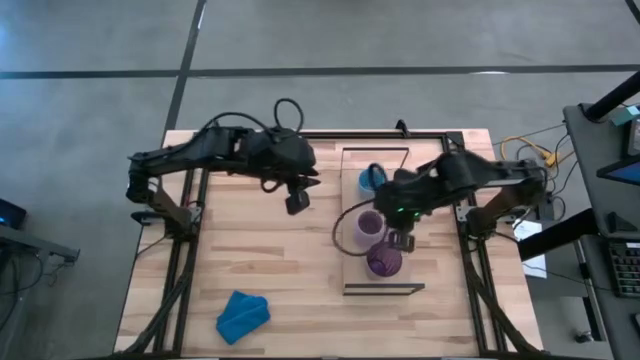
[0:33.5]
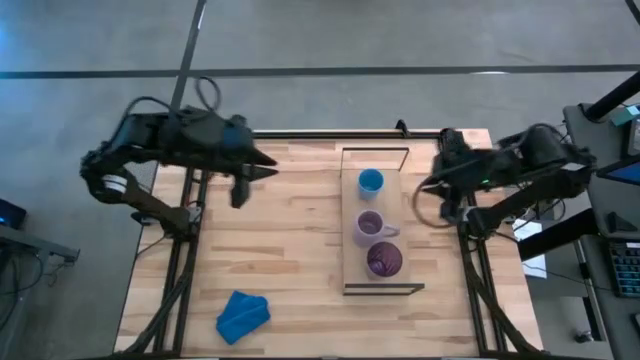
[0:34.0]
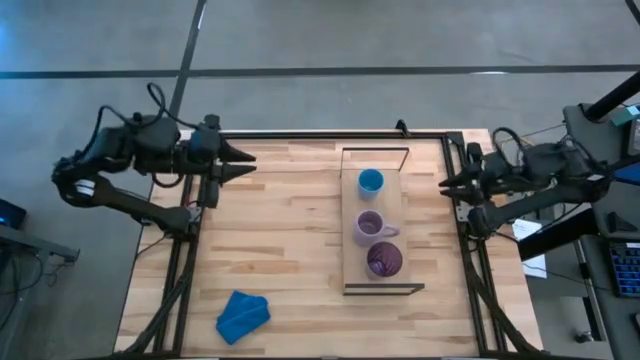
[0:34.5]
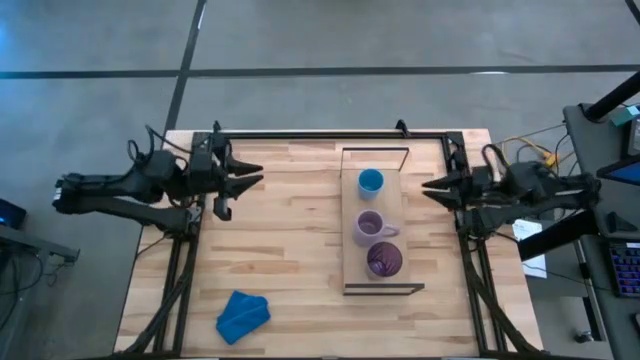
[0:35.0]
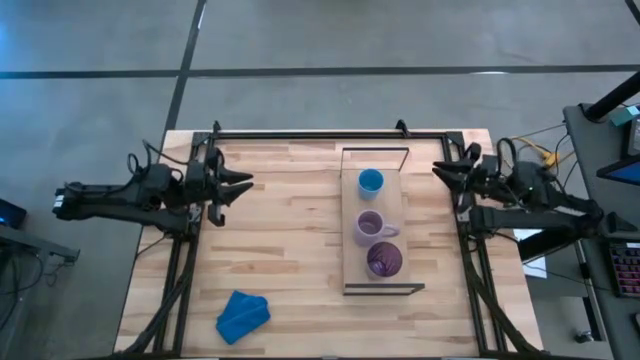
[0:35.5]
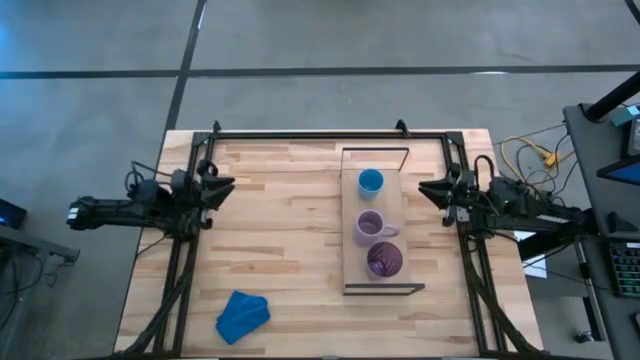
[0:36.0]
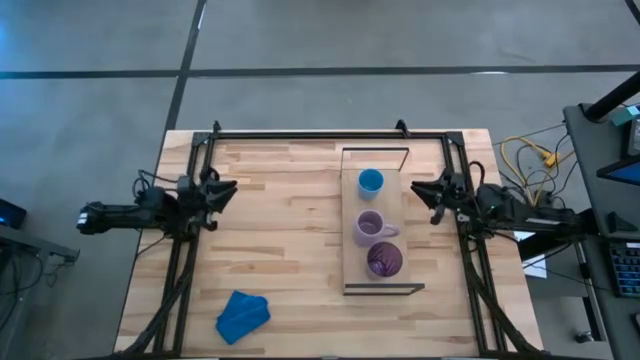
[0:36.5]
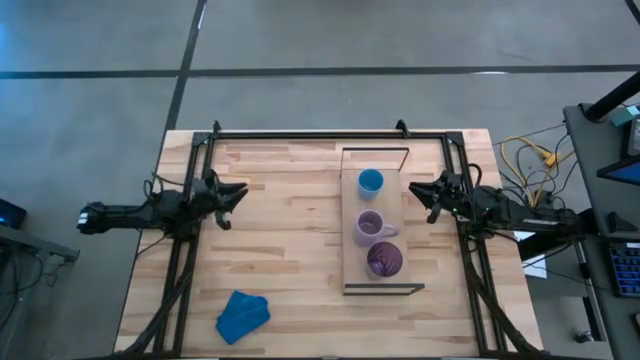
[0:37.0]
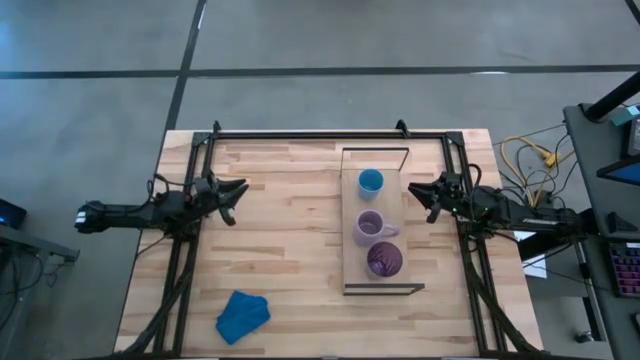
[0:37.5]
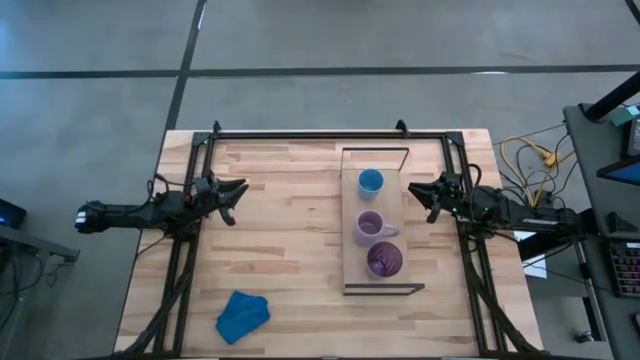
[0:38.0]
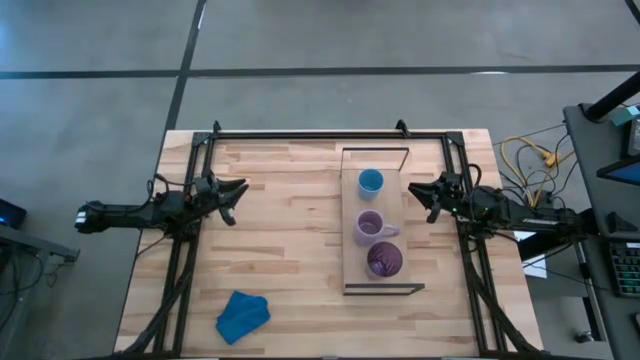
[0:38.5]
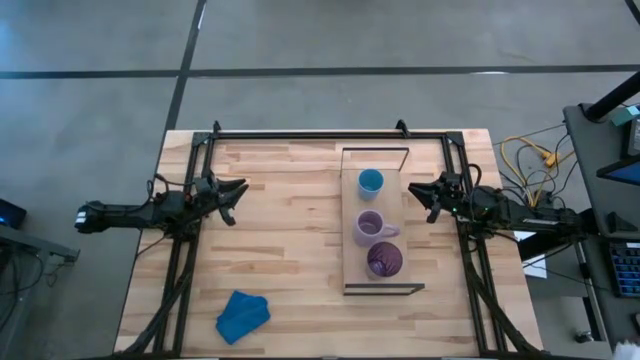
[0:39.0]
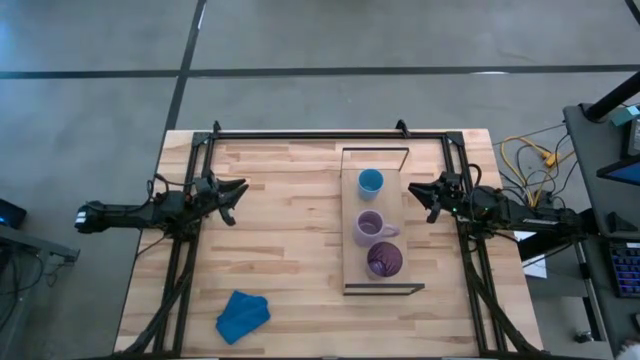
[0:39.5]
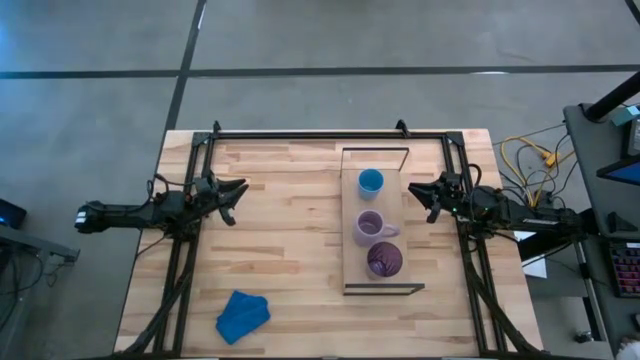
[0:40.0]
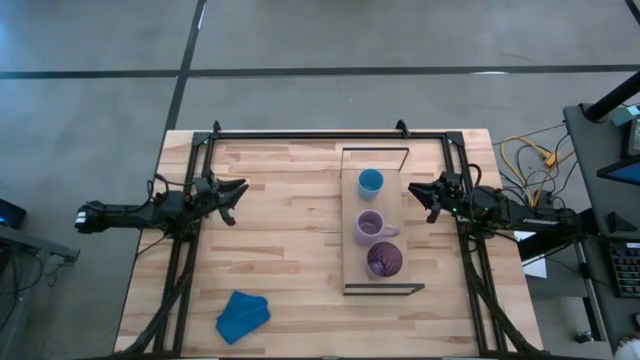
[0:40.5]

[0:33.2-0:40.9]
Task: Stack small to large cups/mugs on shelf
Return to Home Position

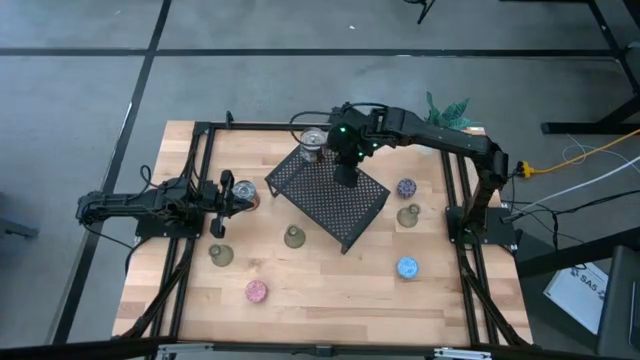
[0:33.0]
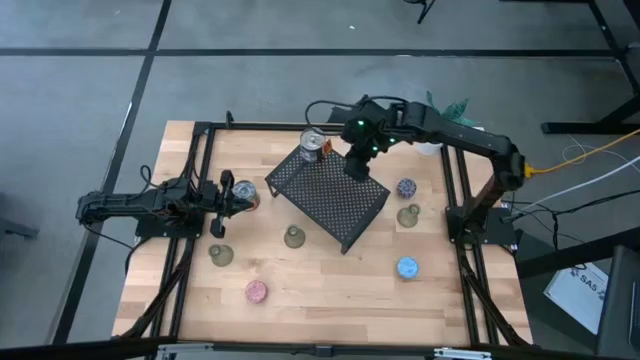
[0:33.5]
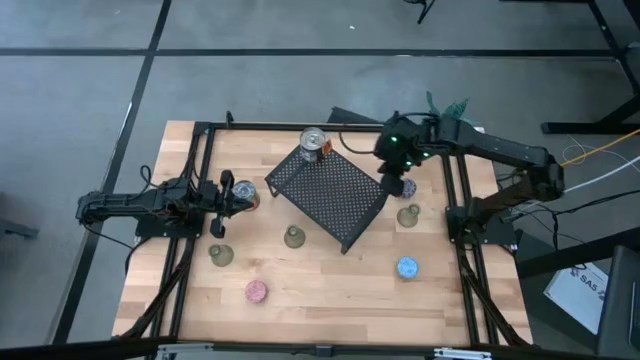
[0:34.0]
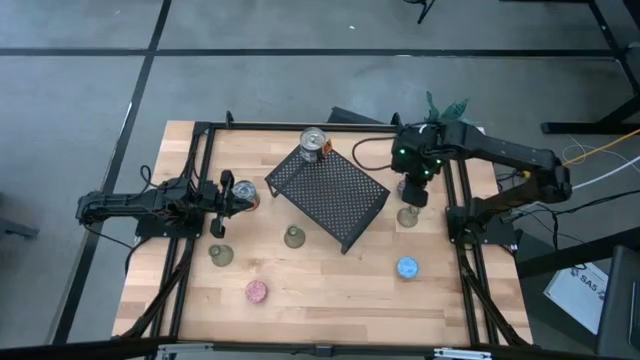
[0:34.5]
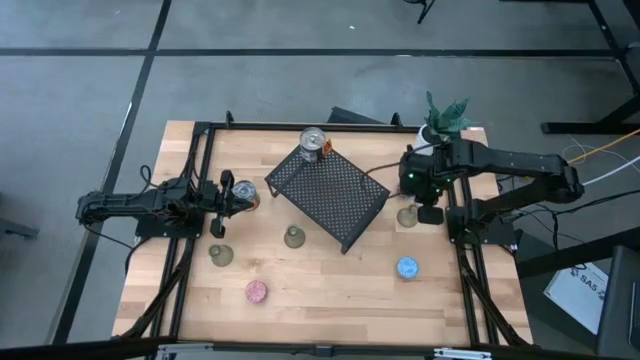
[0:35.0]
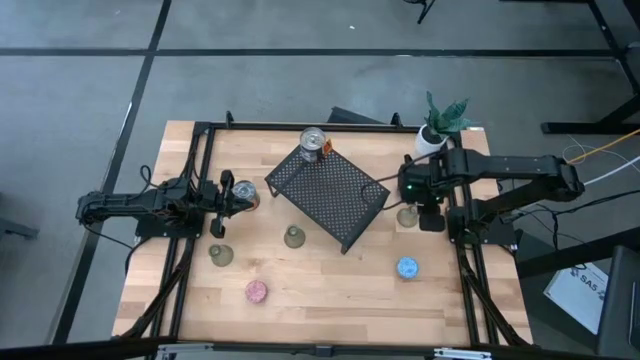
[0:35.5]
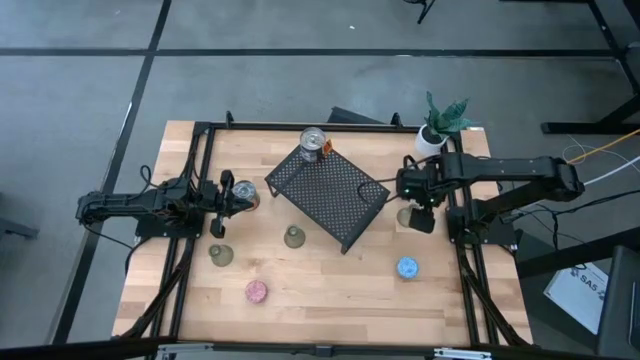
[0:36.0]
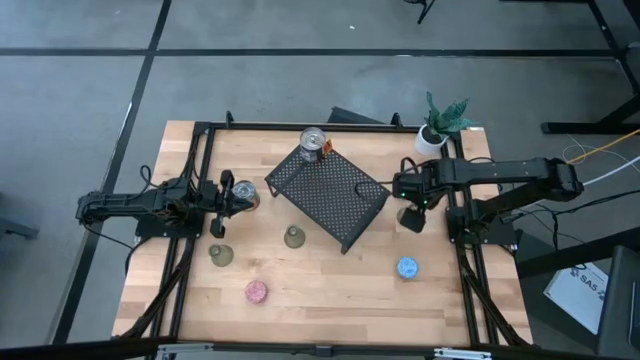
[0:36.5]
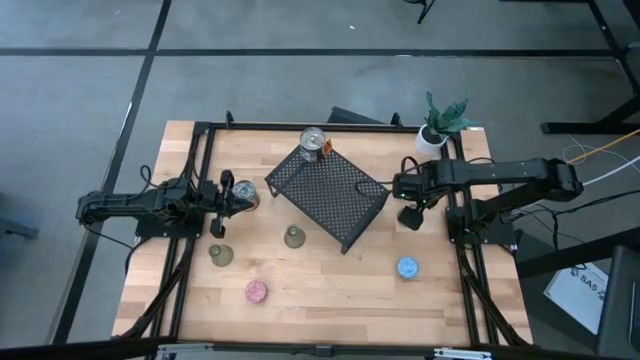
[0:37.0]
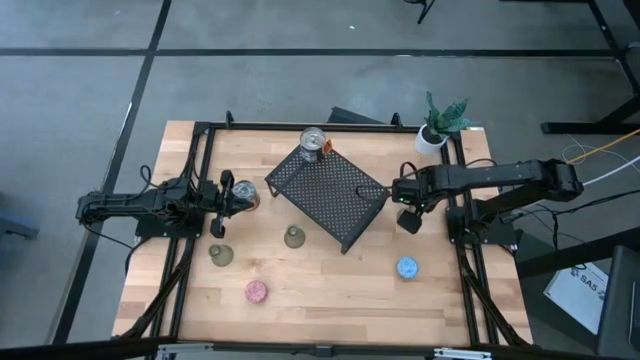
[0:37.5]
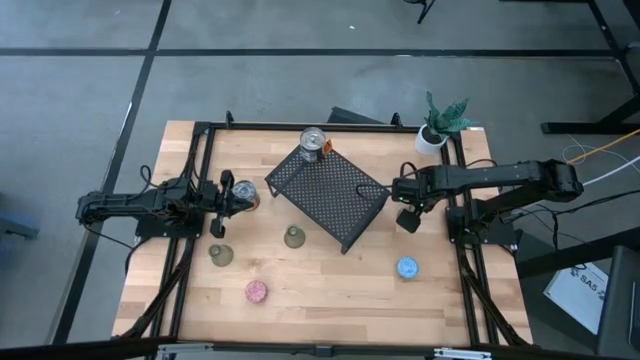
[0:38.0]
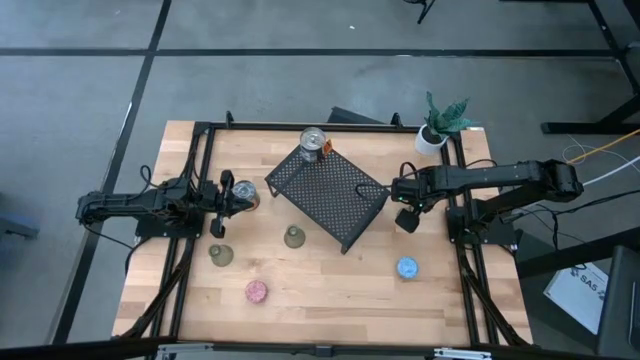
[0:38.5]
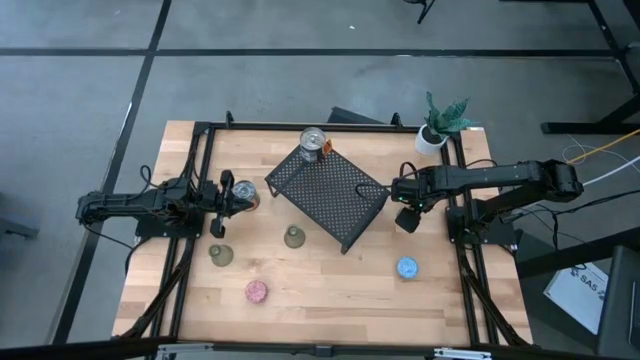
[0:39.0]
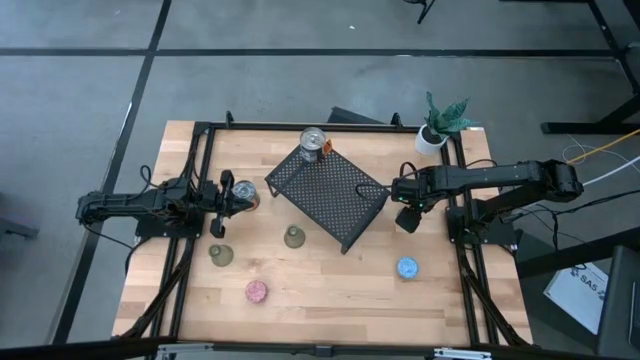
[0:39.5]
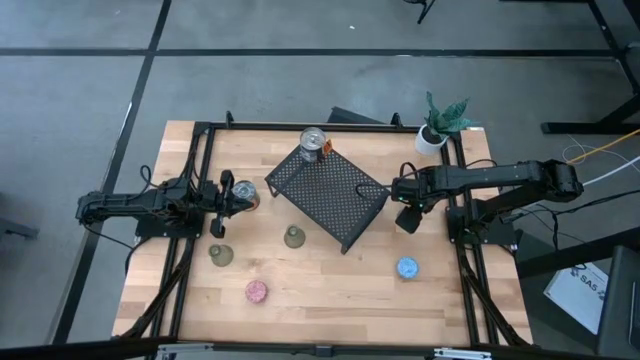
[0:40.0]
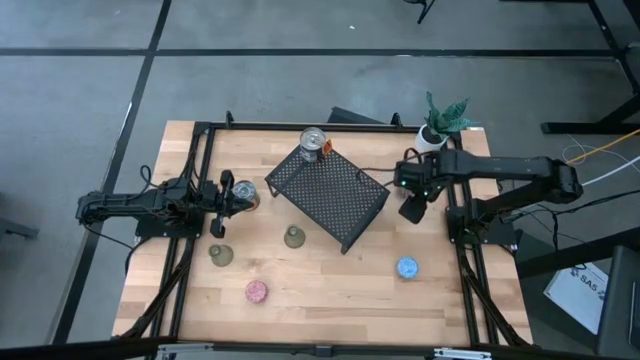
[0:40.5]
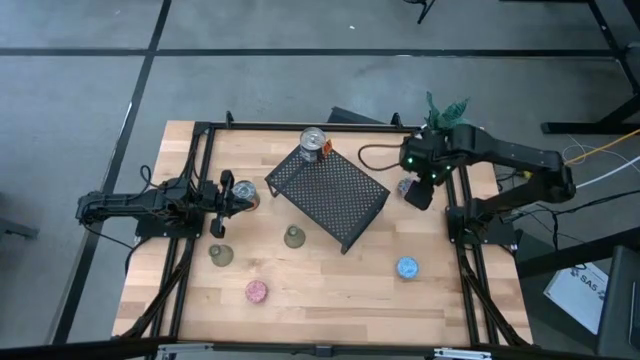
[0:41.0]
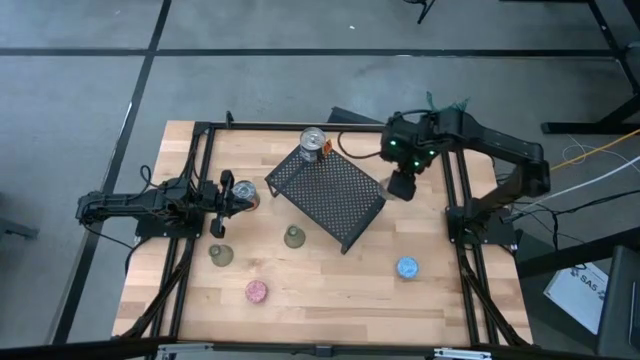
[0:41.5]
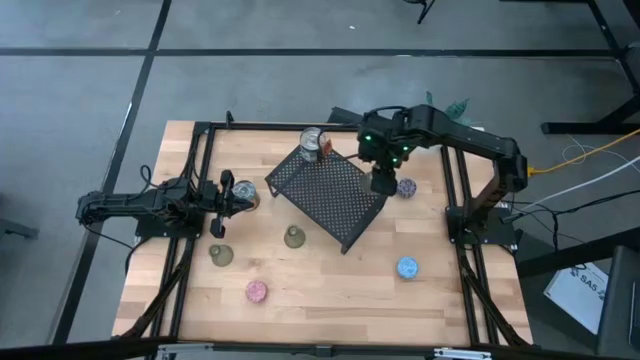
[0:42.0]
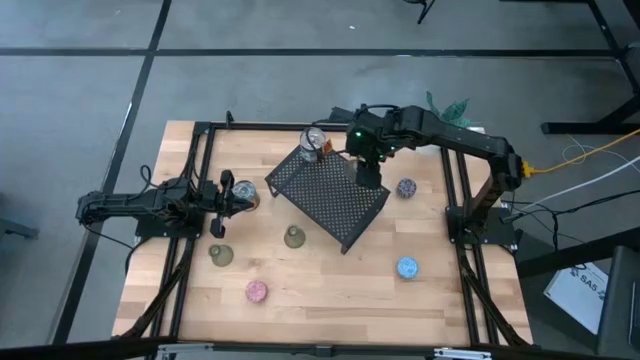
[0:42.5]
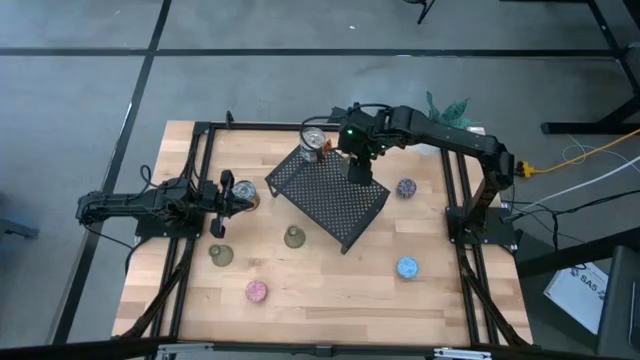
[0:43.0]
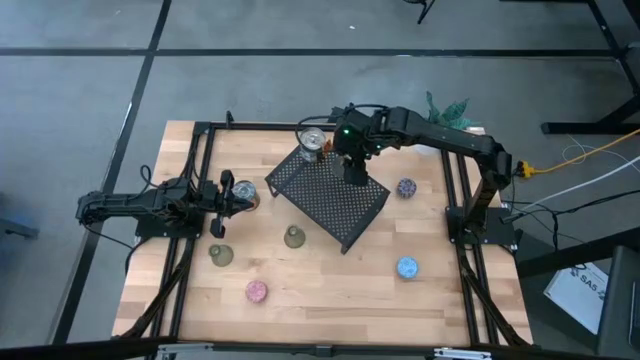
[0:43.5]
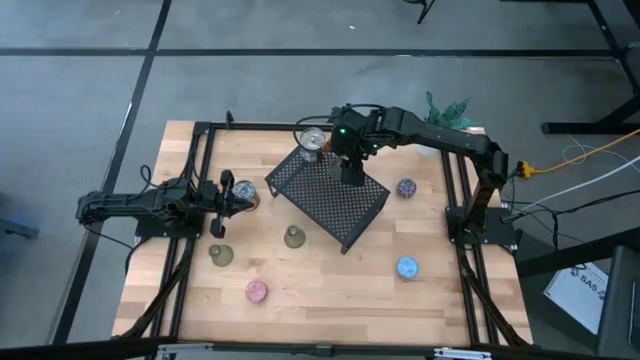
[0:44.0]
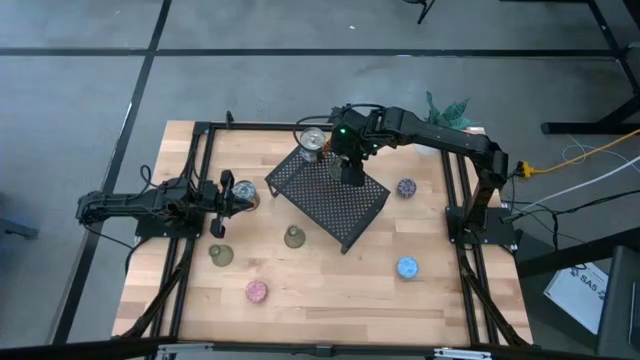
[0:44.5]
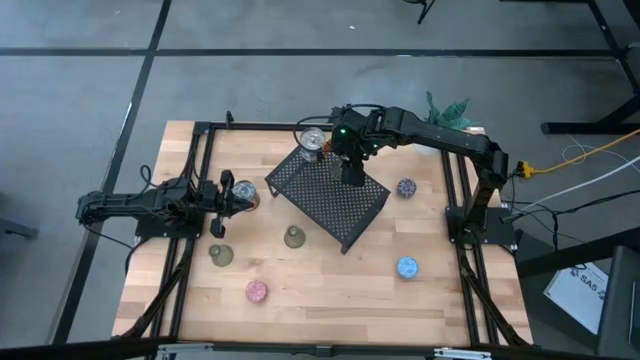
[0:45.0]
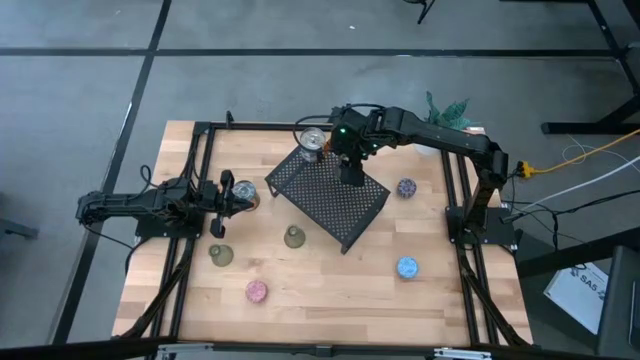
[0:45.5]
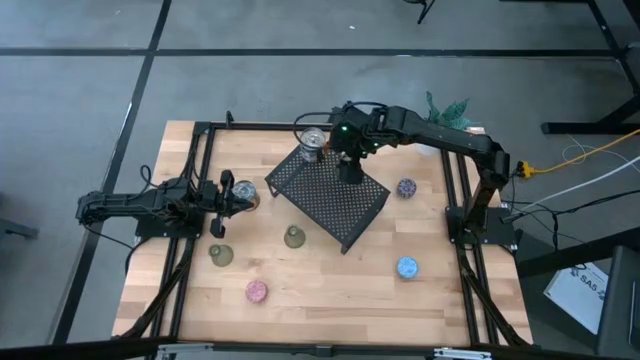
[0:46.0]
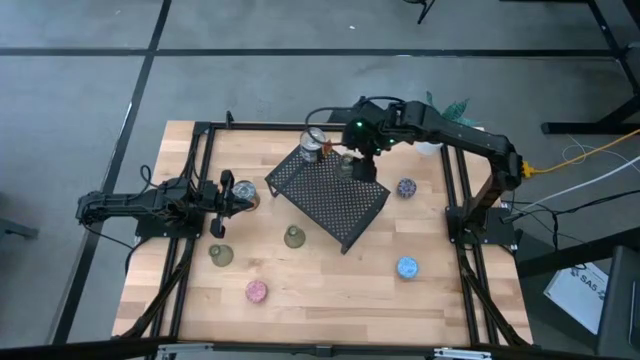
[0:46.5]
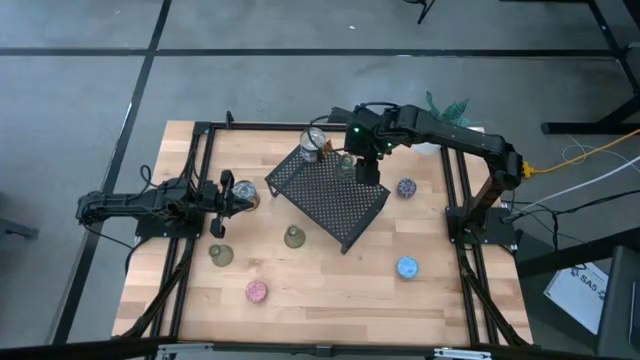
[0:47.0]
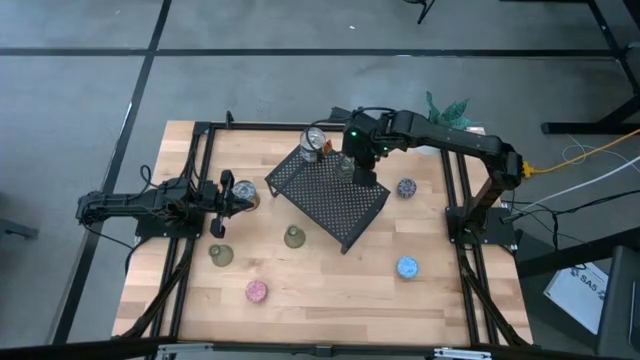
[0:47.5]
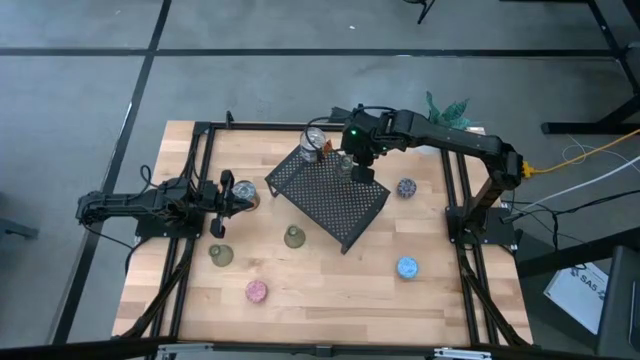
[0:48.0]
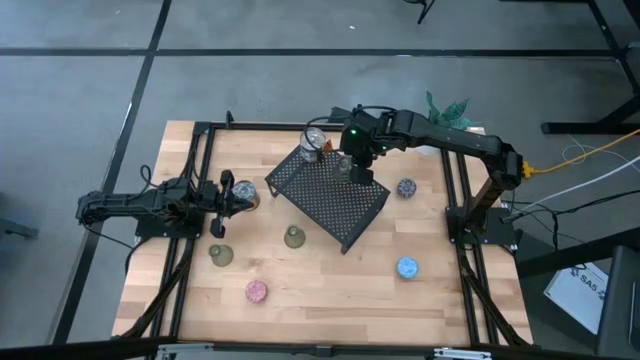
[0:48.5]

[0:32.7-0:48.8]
Task: Pick & Place candle stick holders
Put the right glass candle holder on the shelf
